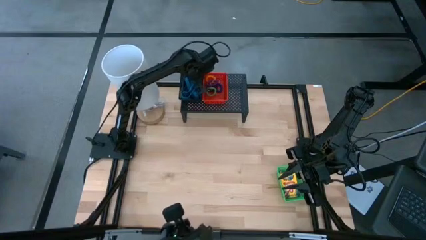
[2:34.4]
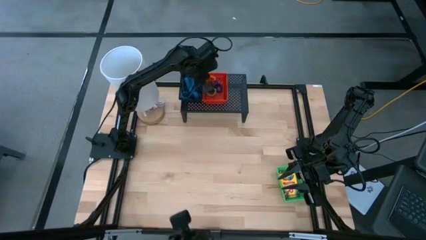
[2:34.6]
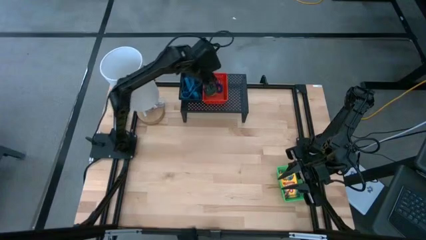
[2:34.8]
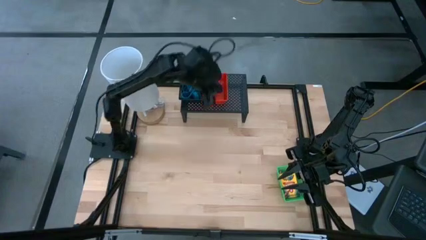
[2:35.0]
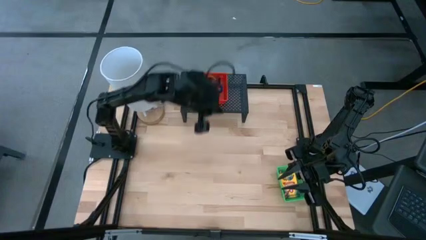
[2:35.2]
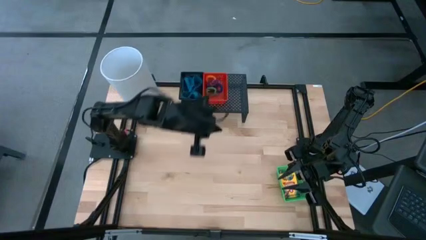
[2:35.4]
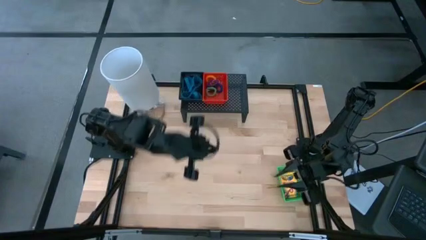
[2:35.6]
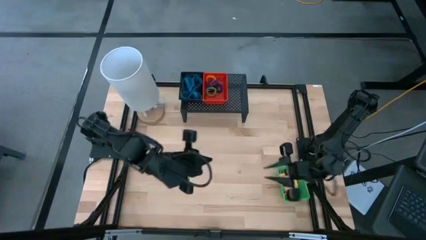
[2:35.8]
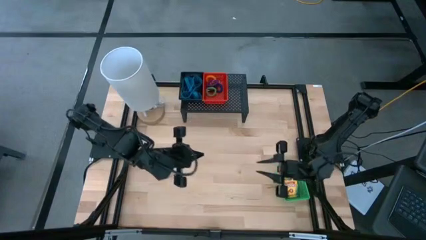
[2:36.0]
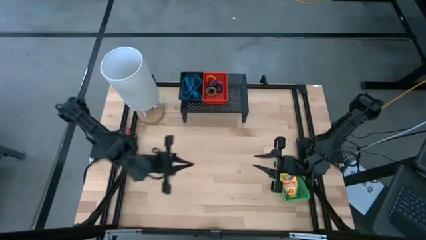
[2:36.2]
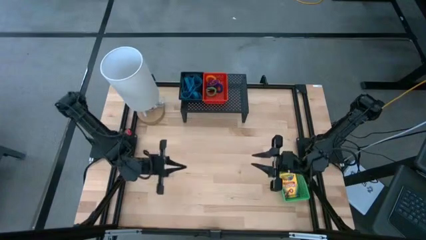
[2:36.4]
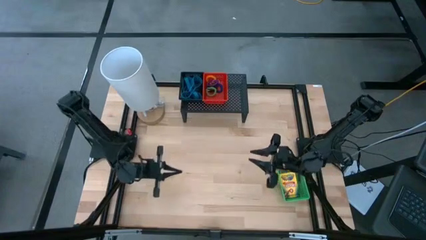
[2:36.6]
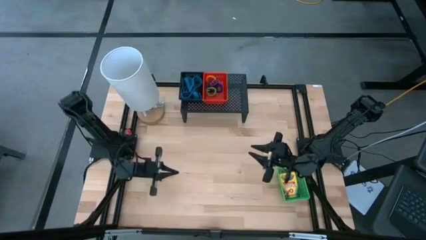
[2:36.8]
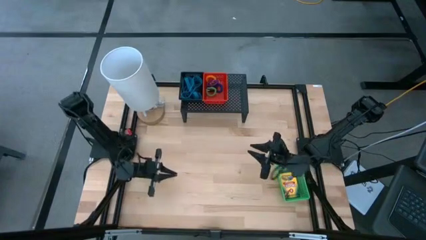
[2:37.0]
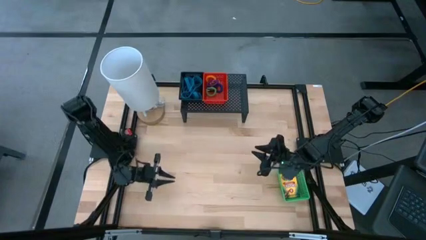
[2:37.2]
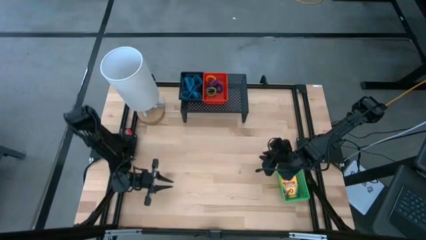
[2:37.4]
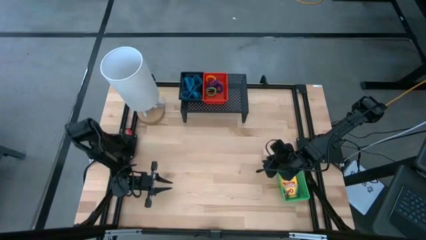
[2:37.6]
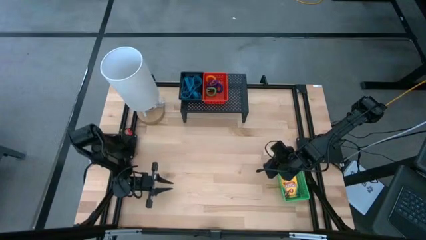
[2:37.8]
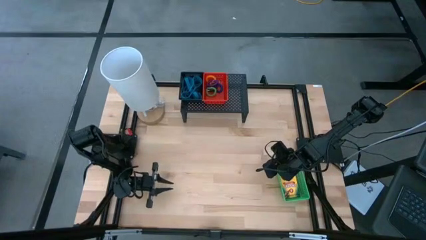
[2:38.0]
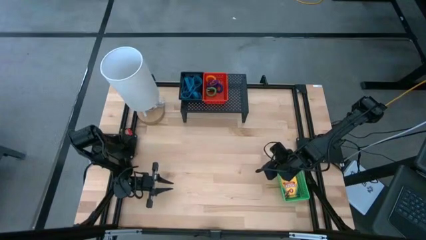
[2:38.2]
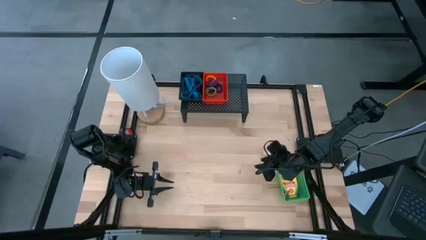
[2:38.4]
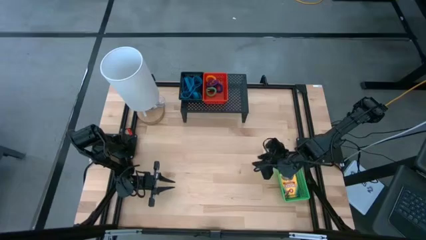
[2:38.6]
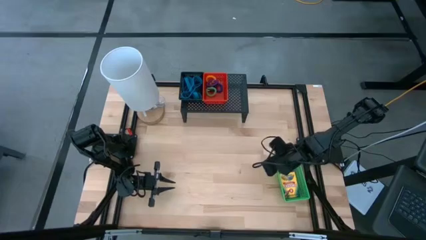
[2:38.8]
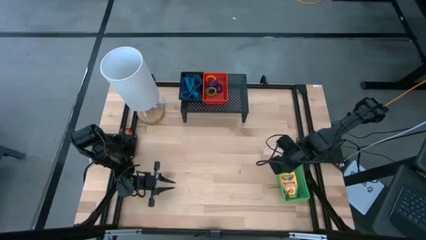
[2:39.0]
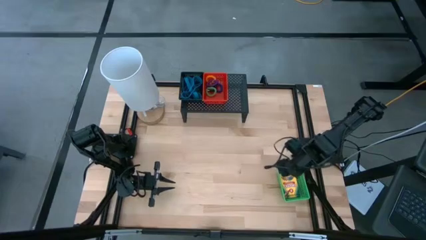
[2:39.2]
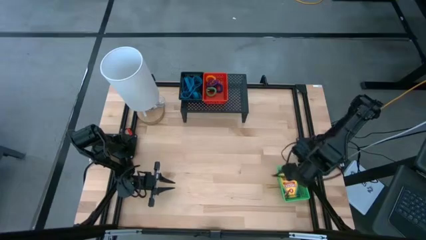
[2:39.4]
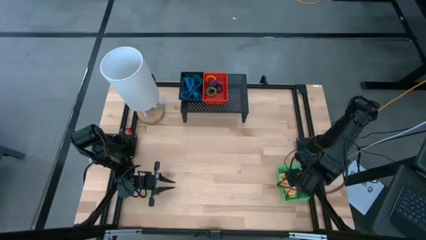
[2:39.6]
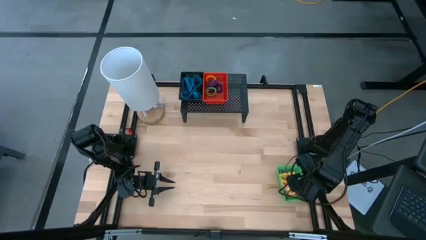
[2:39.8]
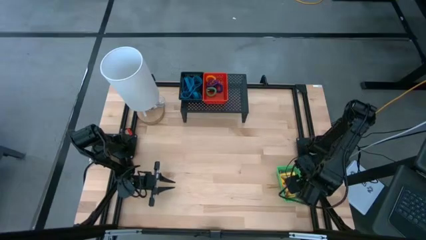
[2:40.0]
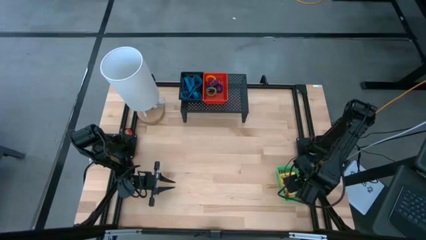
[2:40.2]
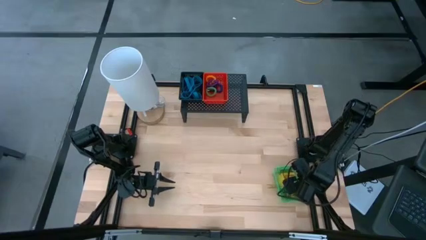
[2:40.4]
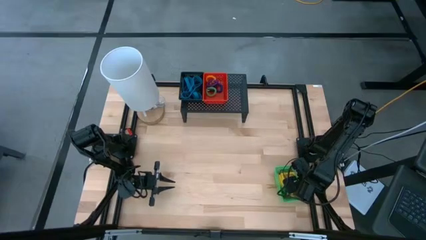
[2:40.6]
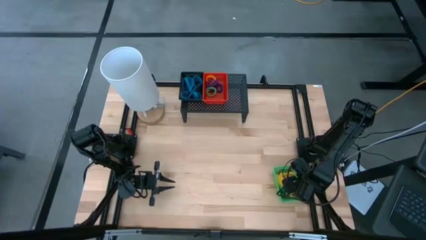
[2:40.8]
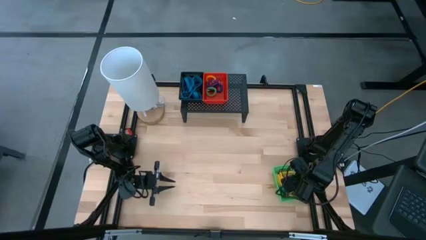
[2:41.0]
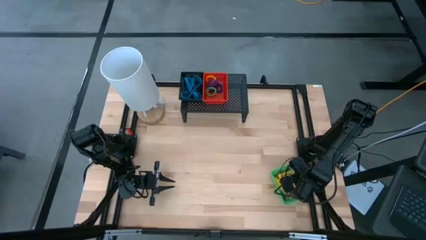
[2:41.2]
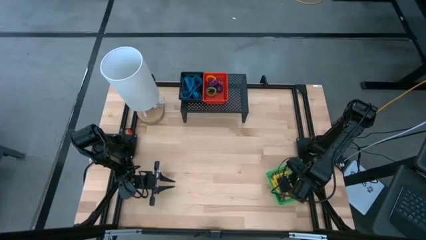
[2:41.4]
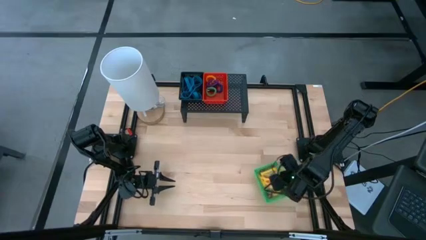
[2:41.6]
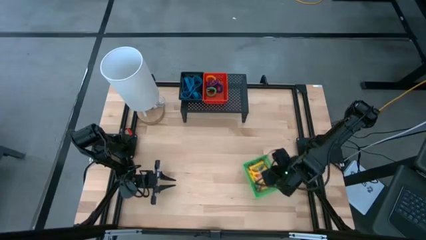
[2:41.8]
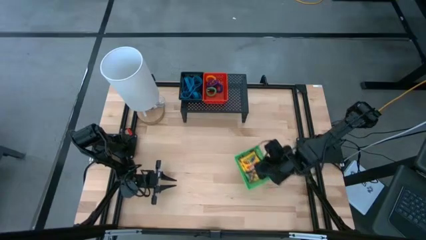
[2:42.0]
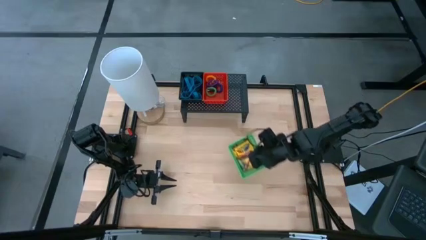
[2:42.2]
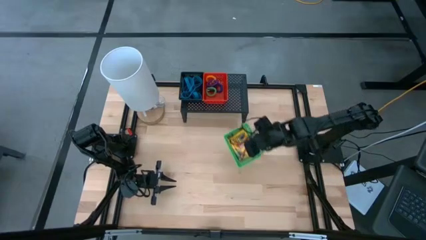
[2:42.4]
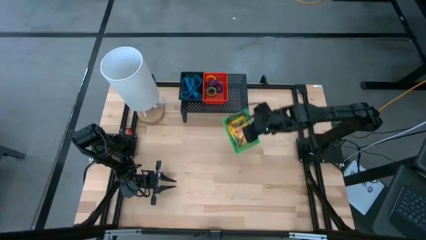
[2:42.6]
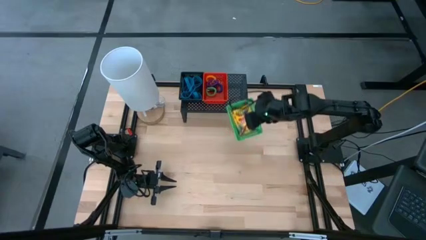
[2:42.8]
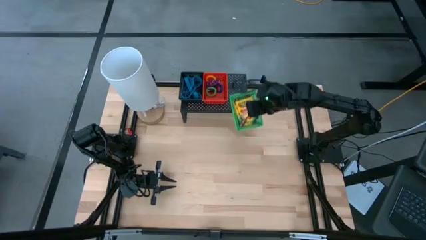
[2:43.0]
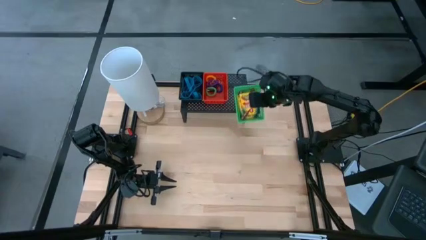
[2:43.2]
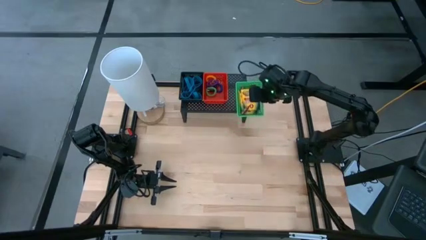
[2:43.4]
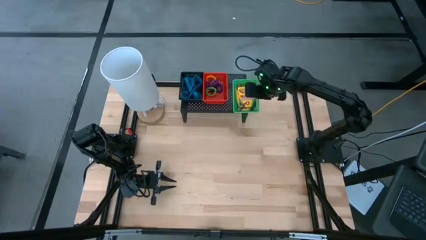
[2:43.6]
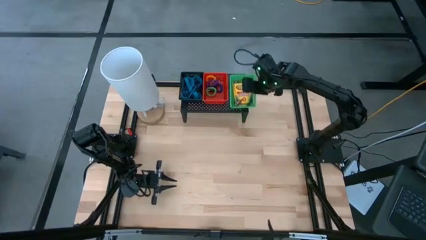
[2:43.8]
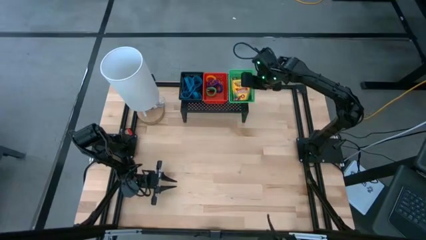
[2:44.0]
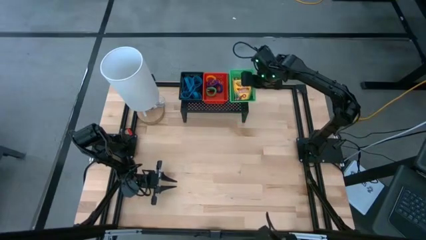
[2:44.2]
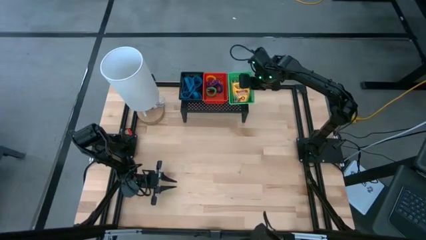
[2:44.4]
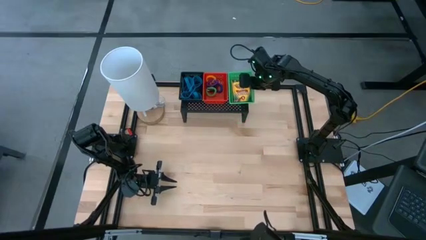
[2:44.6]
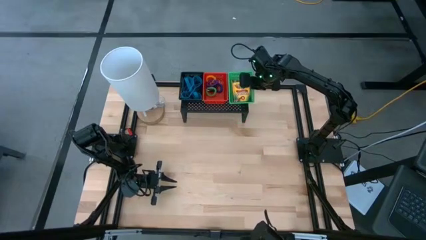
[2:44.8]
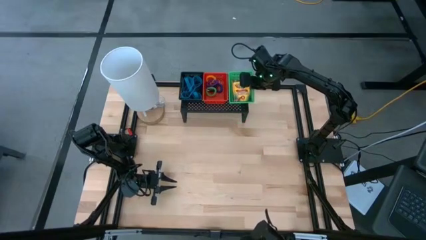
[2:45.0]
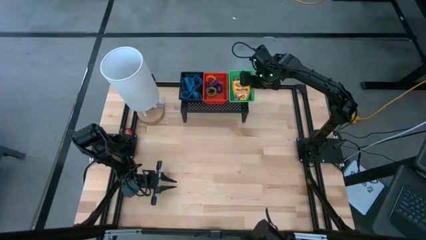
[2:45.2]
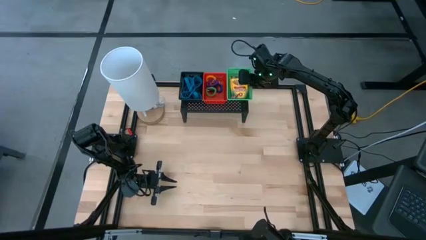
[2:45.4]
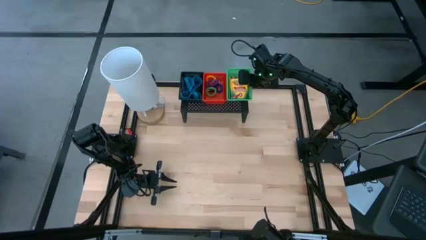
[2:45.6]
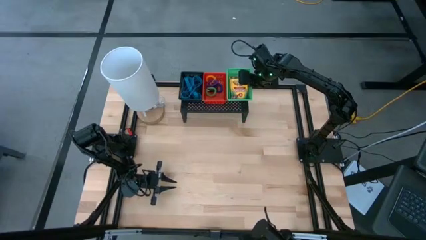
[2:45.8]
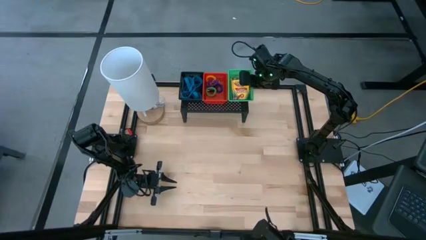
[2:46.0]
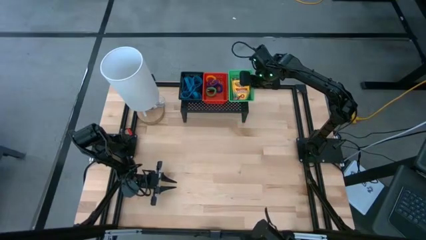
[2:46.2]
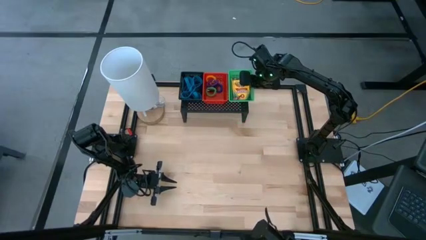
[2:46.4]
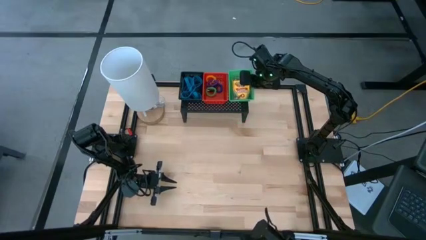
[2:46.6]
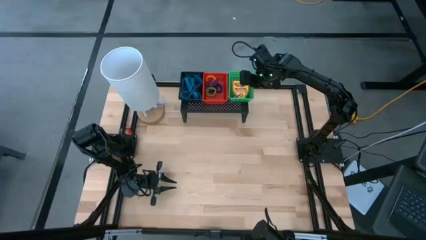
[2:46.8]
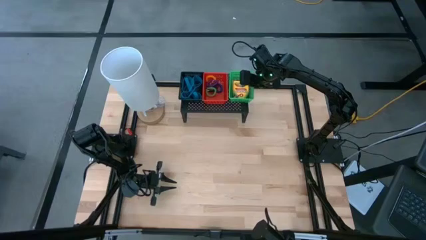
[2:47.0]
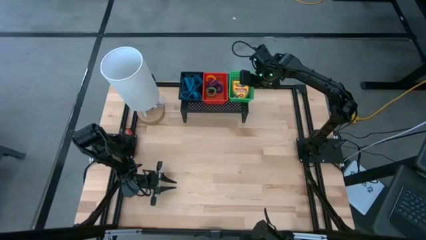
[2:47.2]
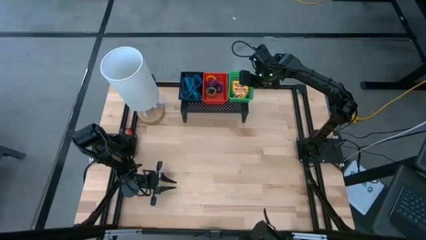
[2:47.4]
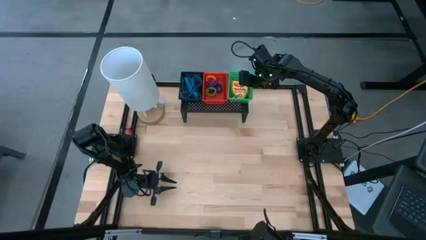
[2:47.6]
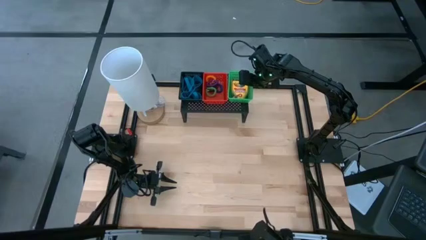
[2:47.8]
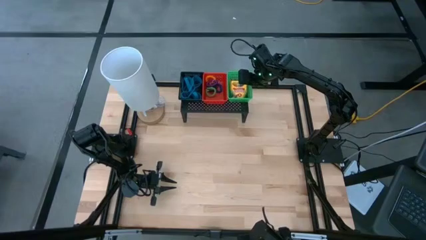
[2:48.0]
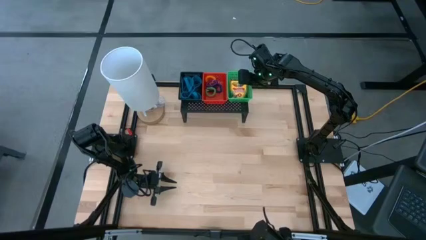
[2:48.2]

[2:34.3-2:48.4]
Task: Pick & Place Office Desk Supplies
Put the green bin filled with crayon boxes on the shelf

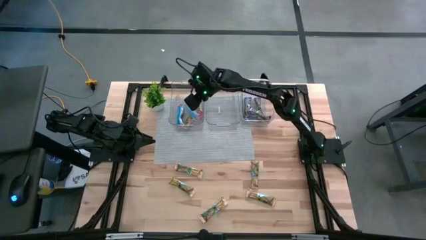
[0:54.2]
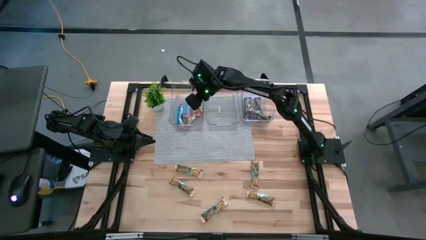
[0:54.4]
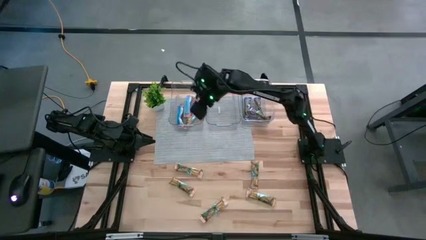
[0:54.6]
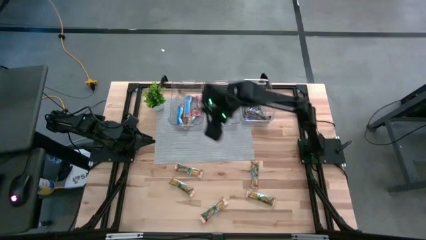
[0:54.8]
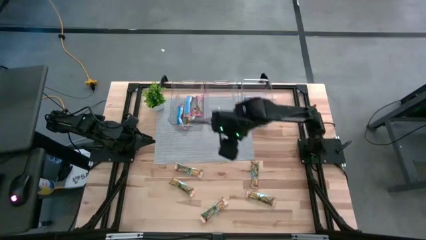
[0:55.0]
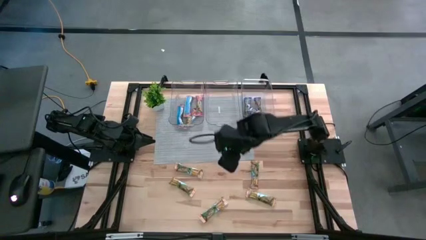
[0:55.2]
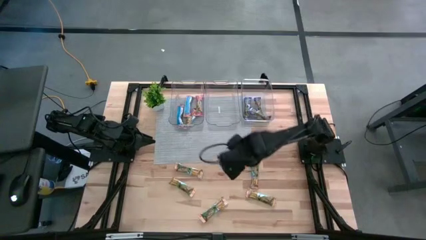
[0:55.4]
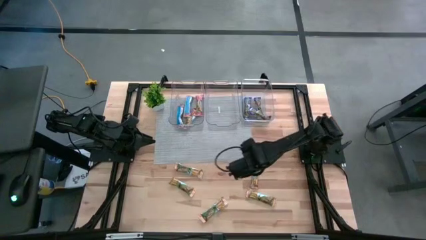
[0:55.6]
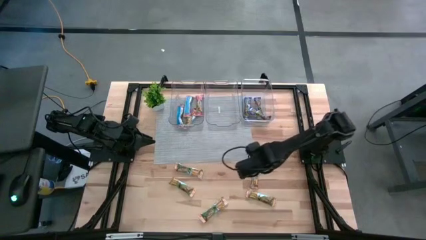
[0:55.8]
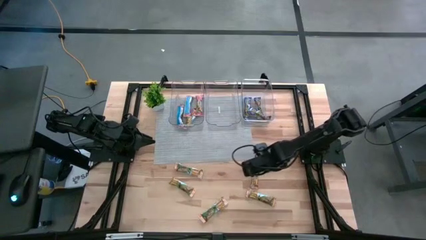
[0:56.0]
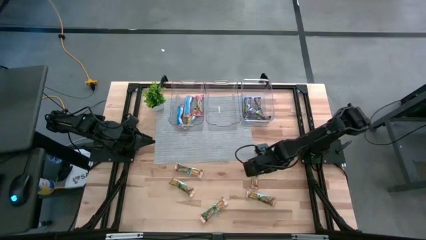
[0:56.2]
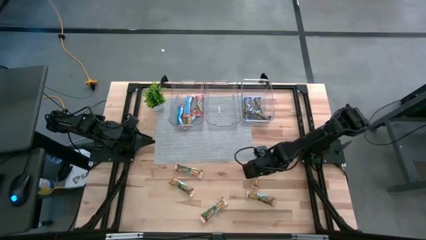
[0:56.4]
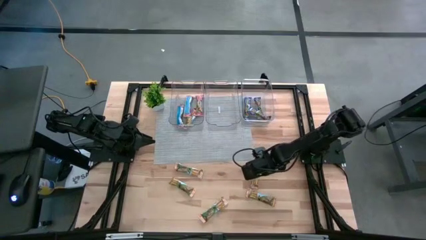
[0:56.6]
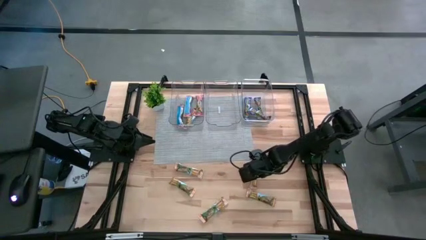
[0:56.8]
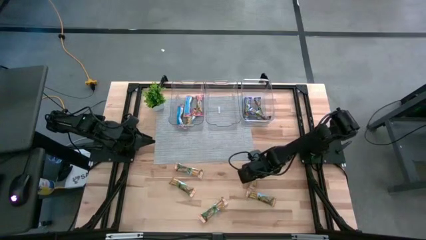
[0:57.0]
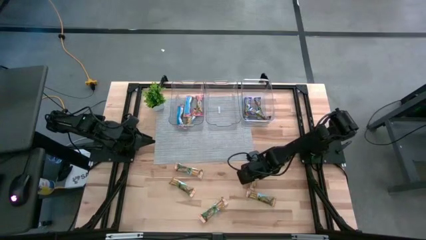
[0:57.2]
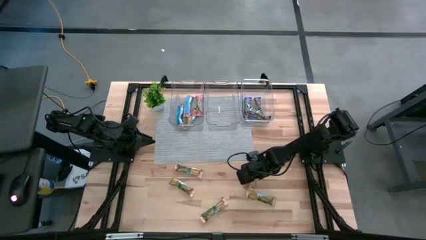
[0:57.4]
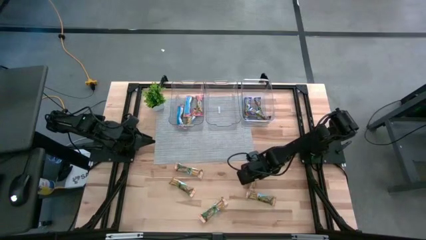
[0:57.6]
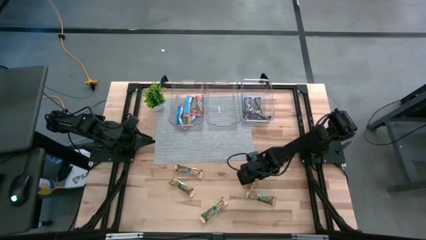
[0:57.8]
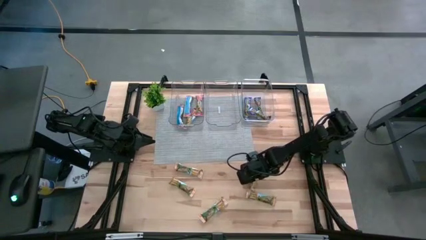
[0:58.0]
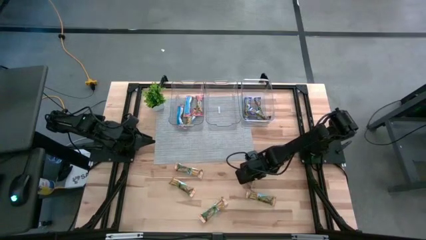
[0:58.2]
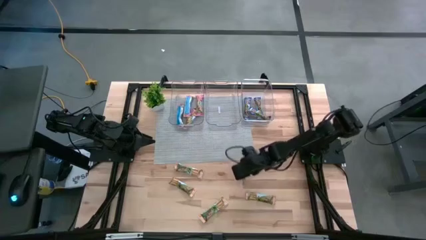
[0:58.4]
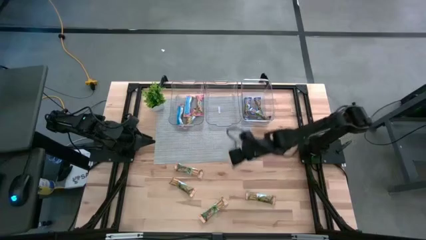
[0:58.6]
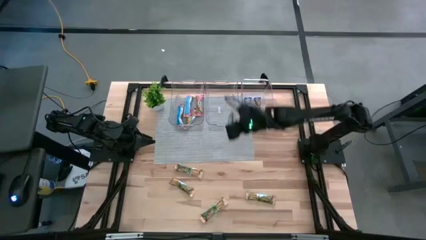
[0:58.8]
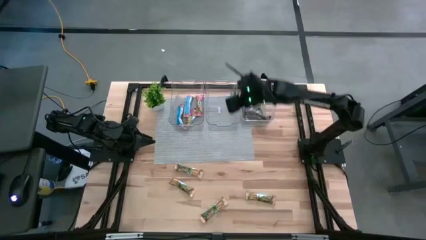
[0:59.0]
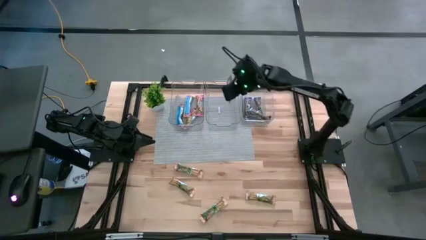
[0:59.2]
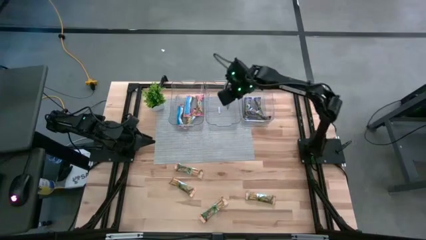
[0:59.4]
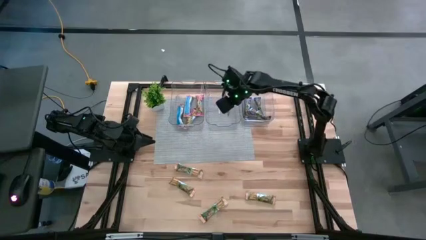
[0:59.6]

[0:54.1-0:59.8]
Task: Pick and place Granola Bars by type
Put the yellow granola bar into the middle transparent bin
